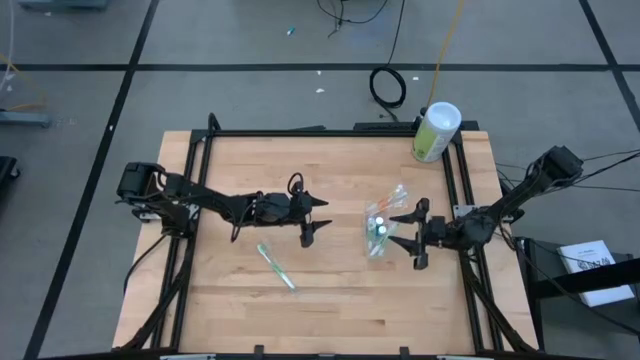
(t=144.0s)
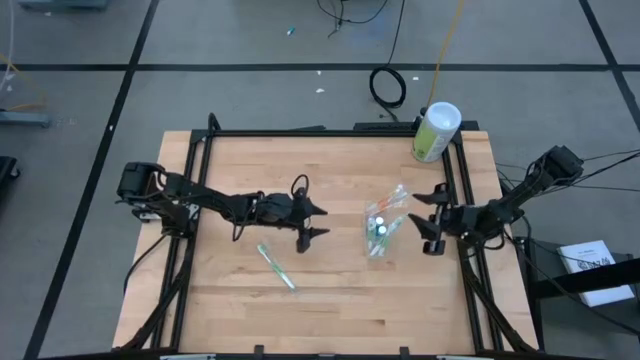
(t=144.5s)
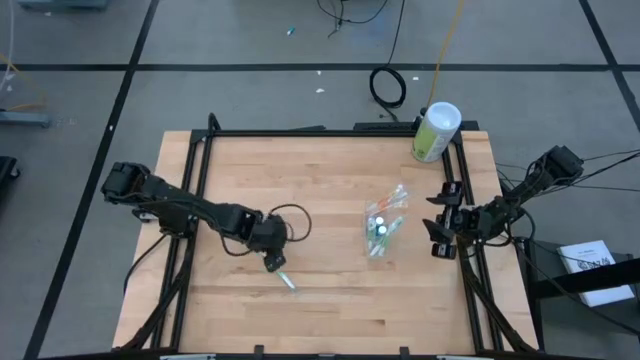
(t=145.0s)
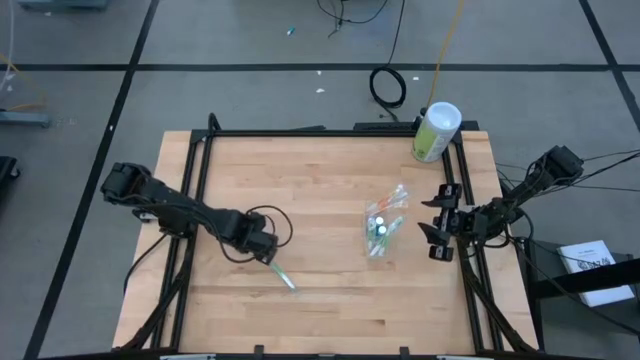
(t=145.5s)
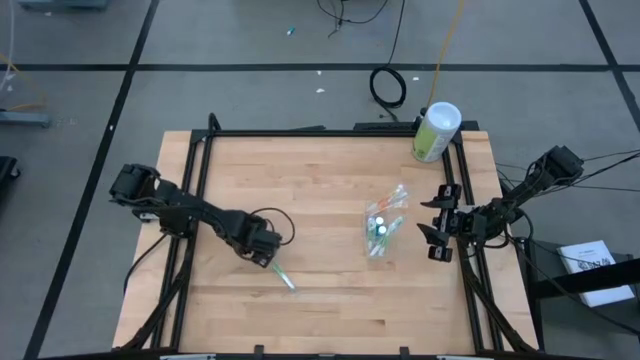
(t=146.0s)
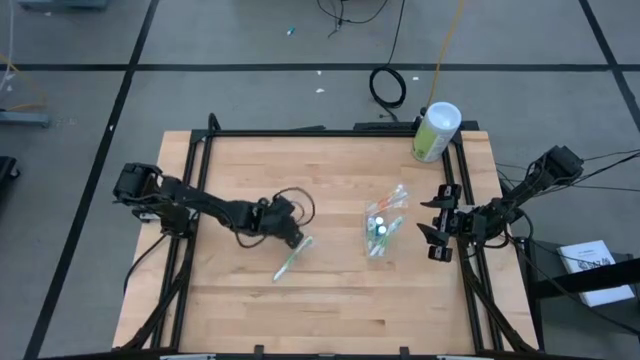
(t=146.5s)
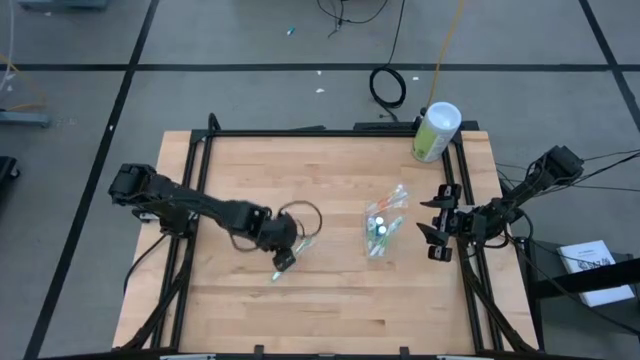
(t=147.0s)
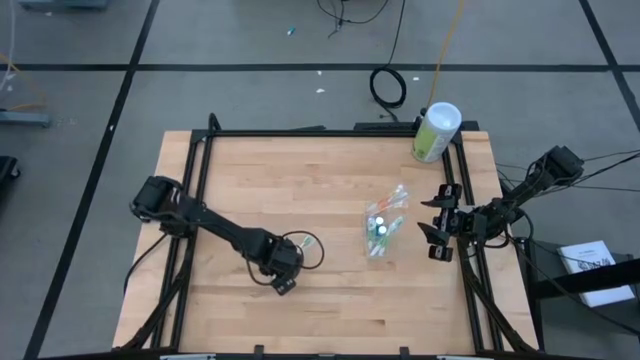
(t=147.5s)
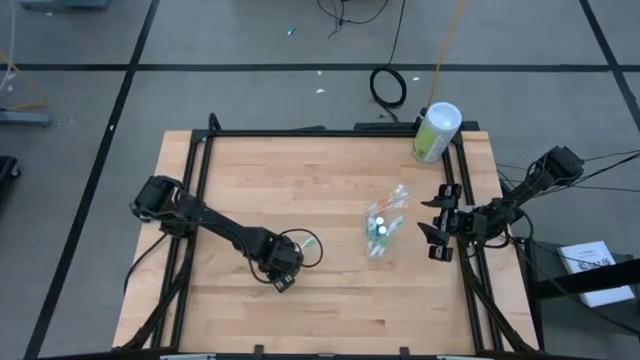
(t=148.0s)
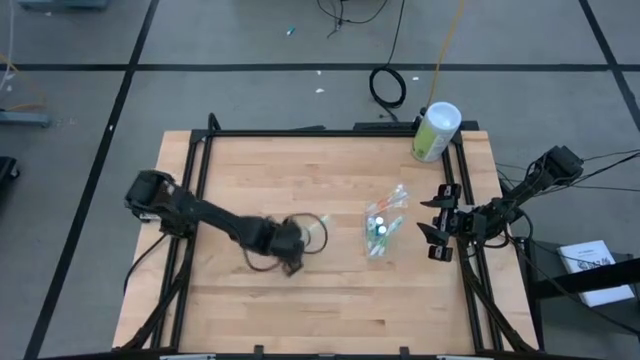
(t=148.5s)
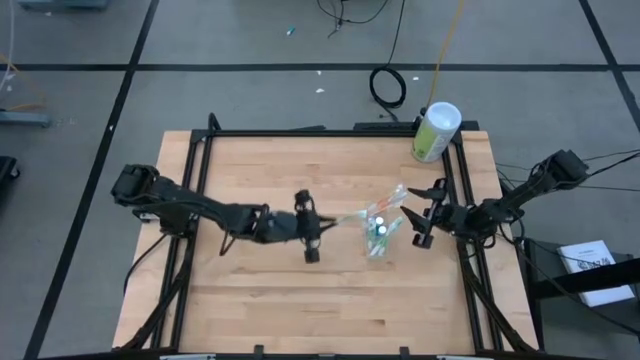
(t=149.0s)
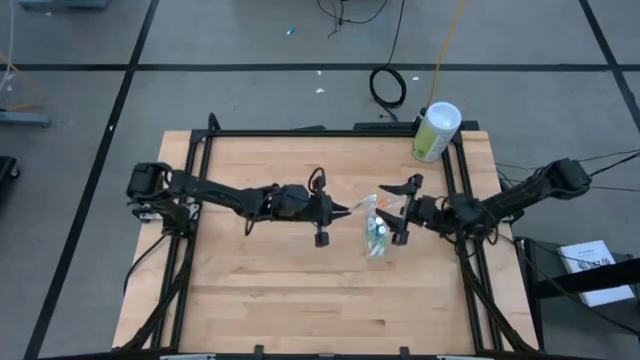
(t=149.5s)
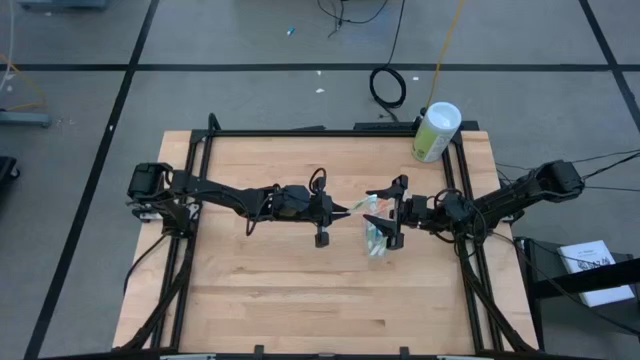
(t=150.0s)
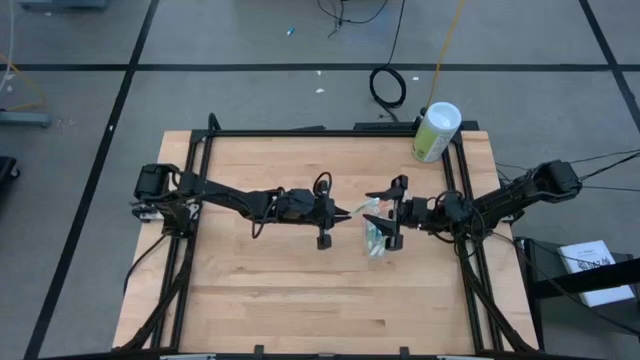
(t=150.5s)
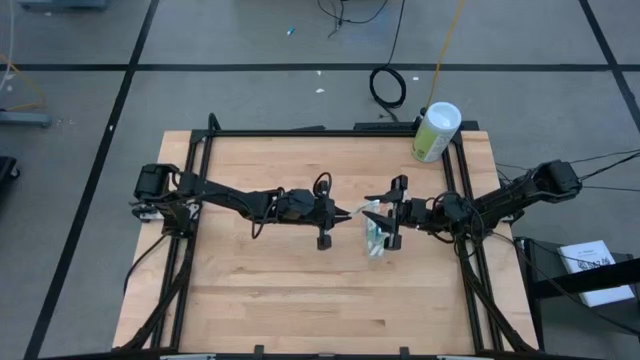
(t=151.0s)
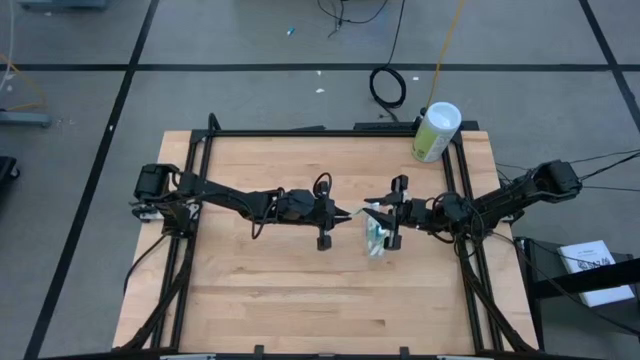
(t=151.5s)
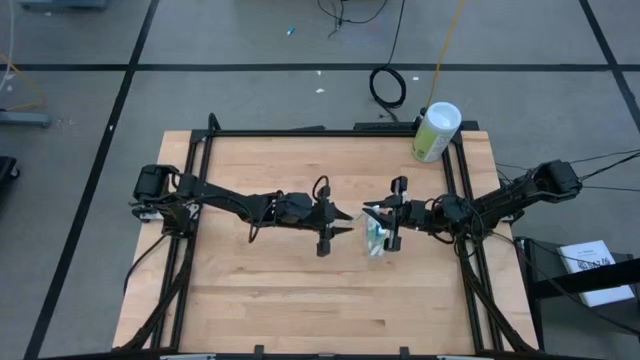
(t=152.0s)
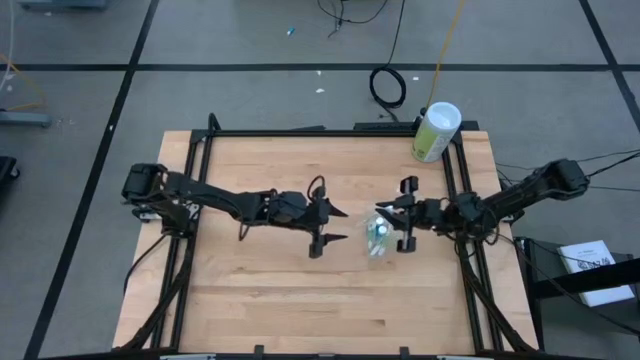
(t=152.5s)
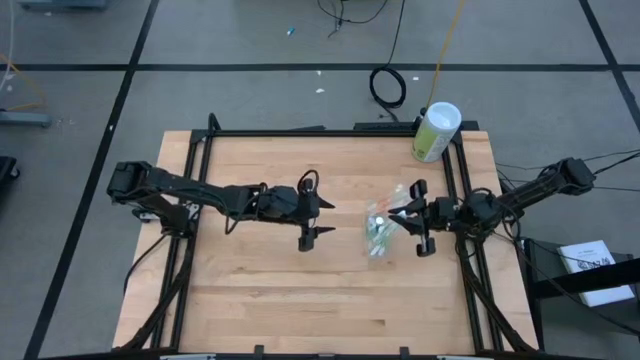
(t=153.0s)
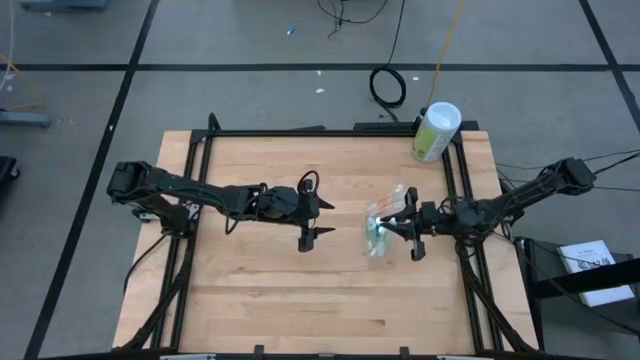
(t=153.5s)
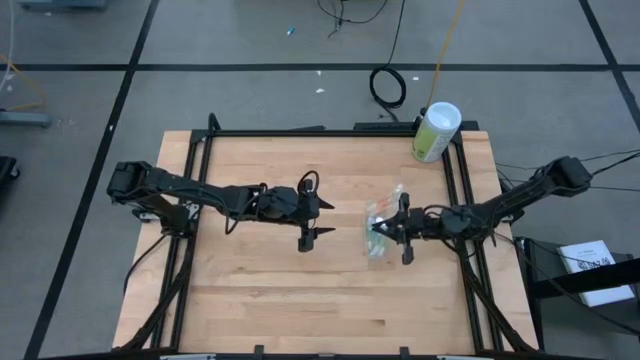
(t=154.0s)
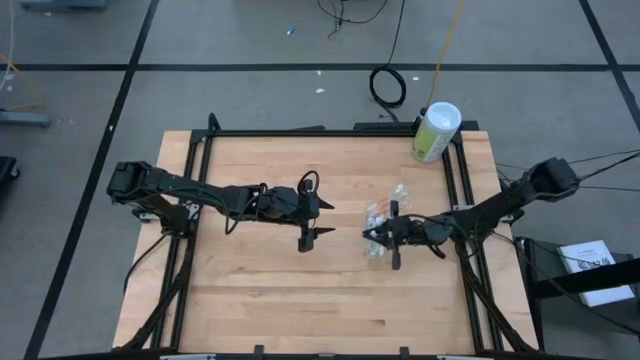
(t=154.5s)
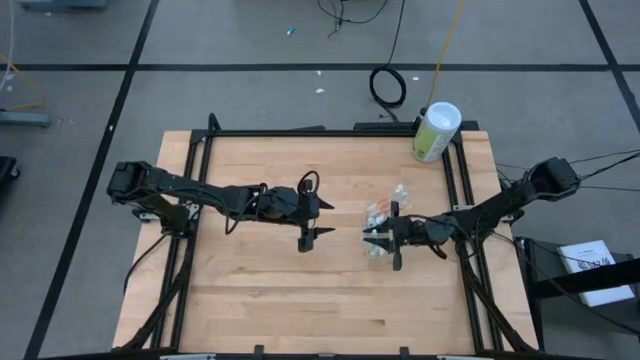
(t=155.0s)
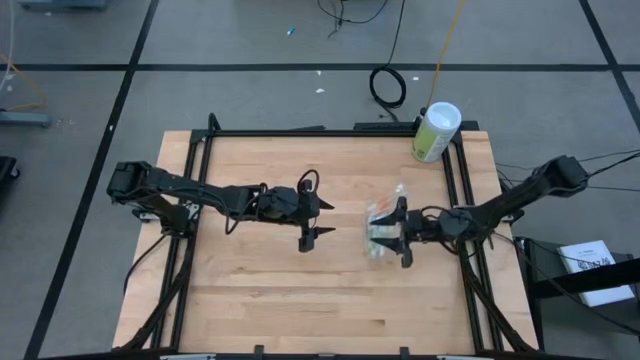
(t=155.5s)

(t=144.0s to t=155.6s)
Task: Pick & Place toothbrushing station
Put the green toothbrush into the bottom of the transparent organizer

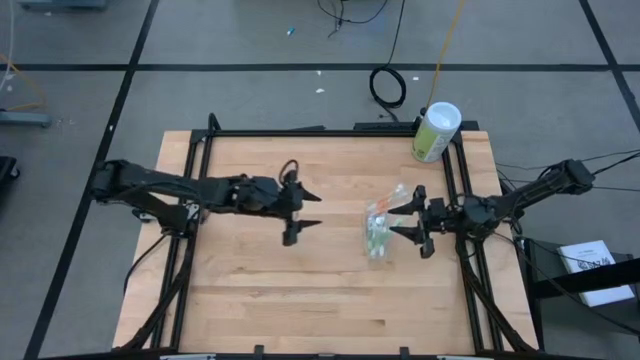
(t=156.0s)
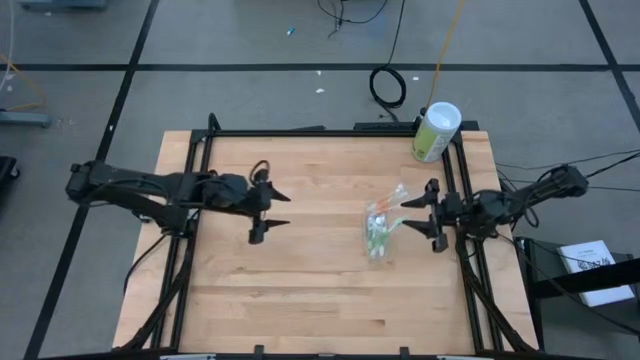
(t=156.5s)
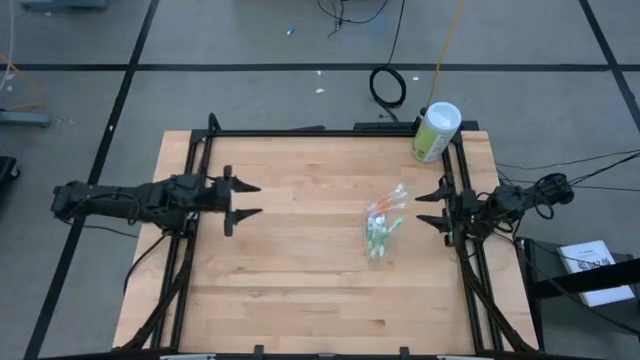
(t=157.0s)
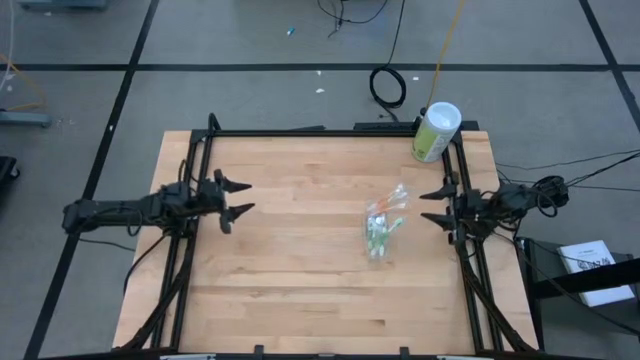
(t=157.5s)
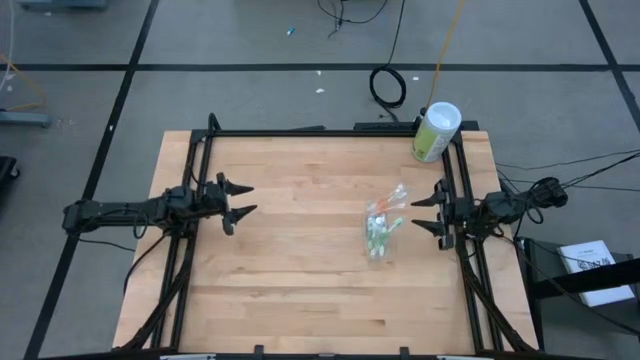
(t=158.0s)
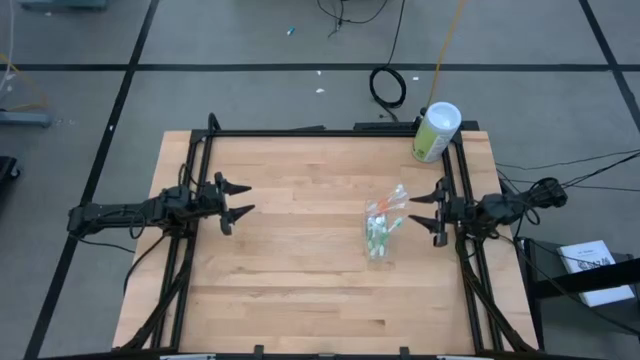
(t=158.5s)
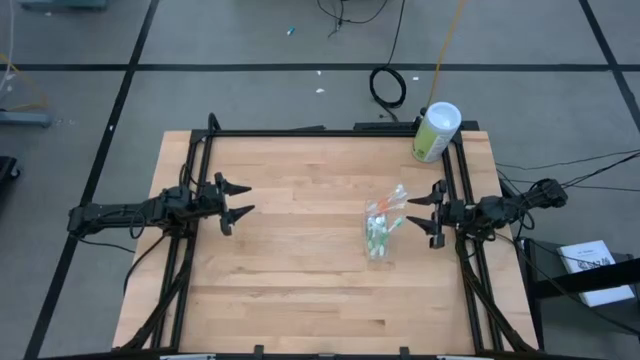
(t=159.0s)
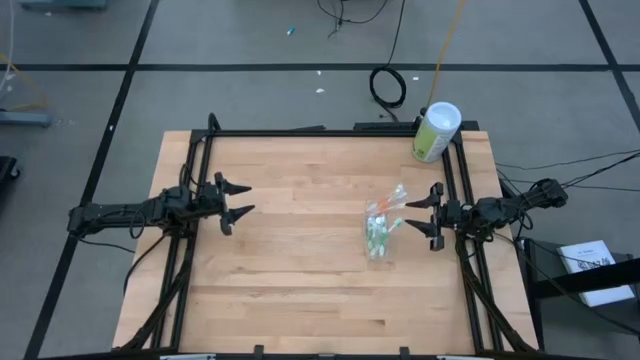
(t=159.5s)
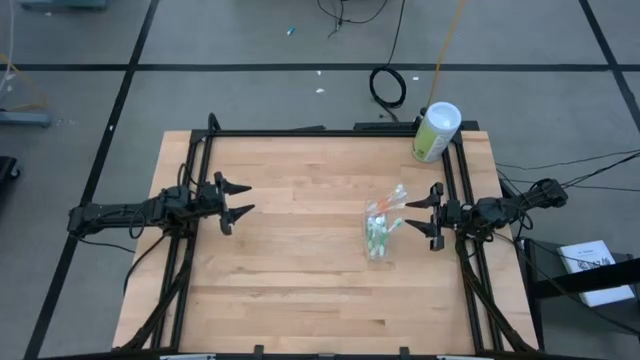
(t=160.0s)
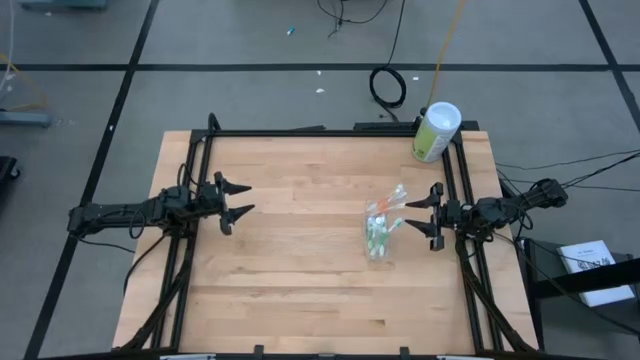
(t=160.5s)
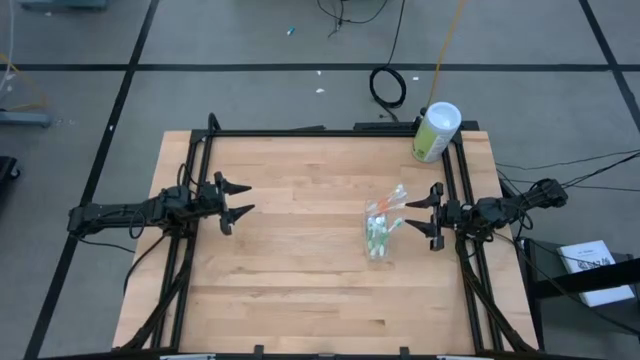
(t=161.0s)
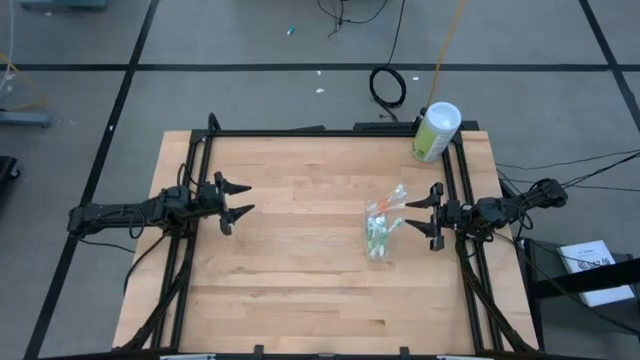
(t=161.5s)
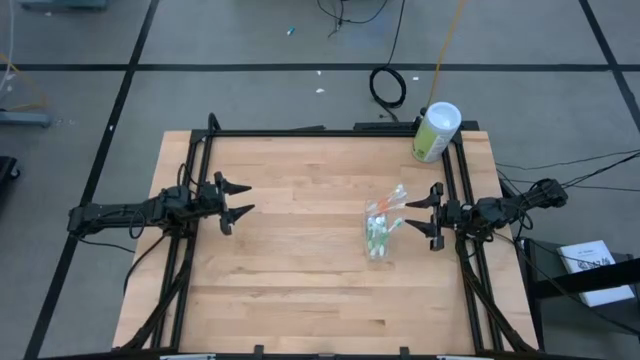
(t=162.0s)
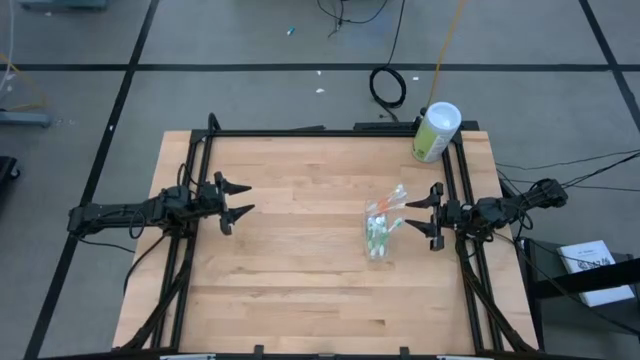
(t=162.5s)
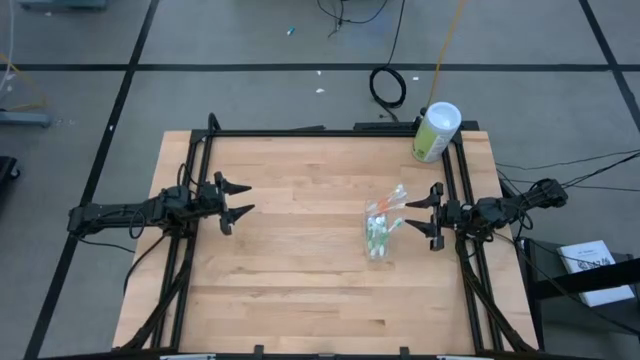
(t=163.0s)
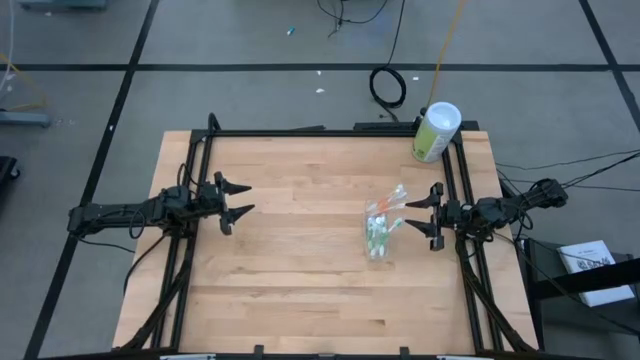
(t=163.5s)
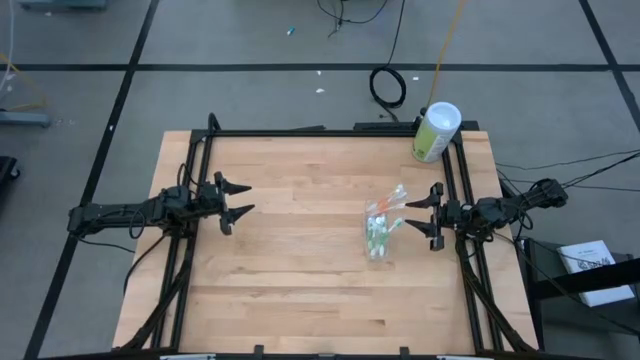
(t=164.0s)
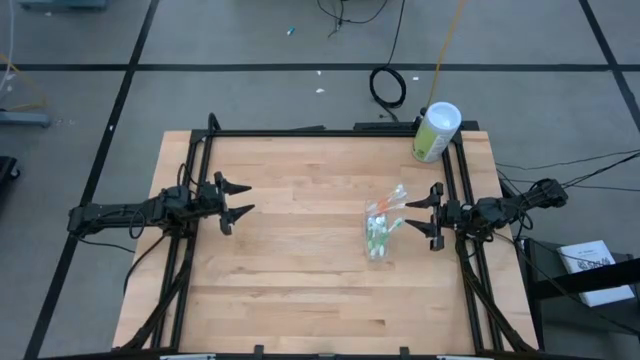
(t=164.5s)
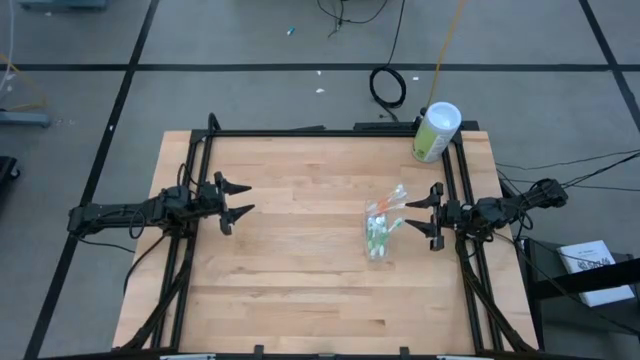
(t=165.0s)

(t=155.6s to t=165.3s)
Return to Home Position
